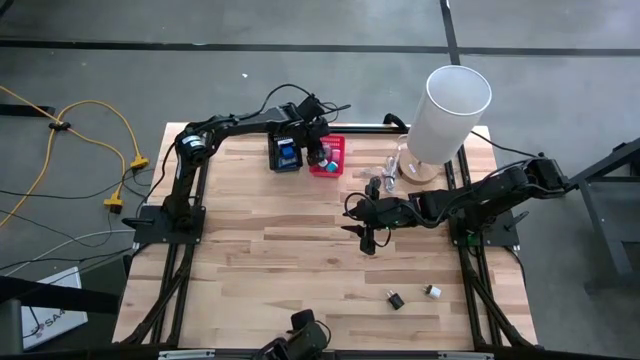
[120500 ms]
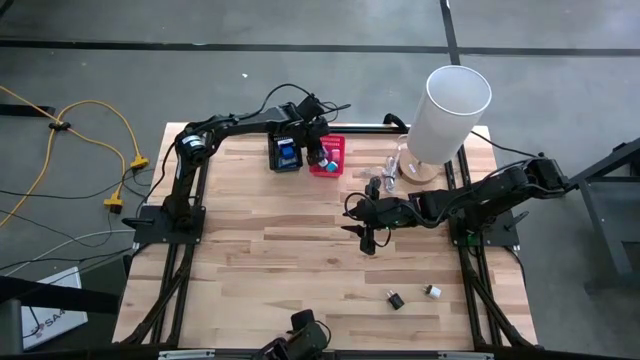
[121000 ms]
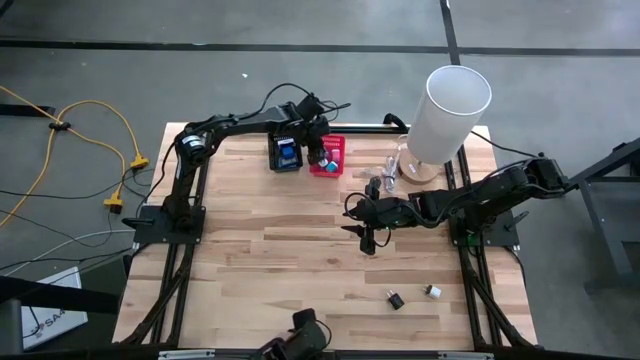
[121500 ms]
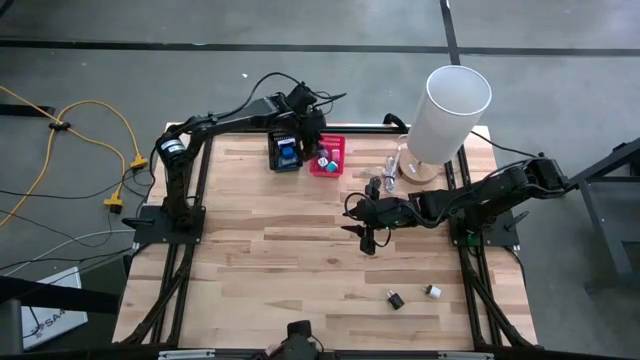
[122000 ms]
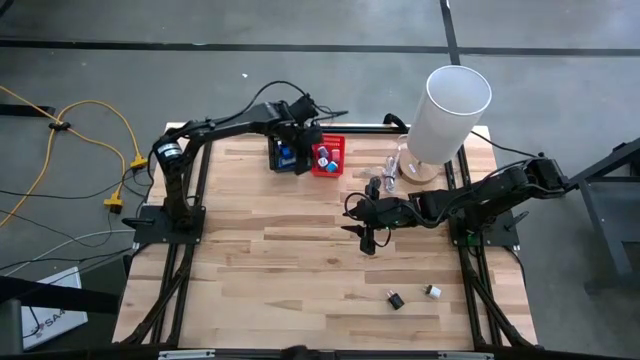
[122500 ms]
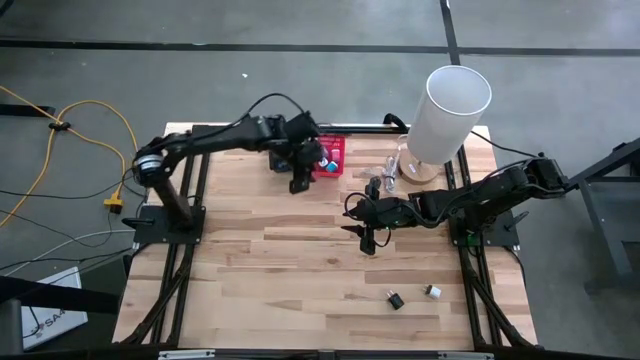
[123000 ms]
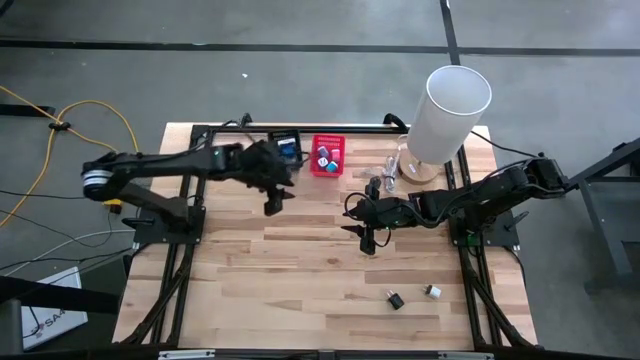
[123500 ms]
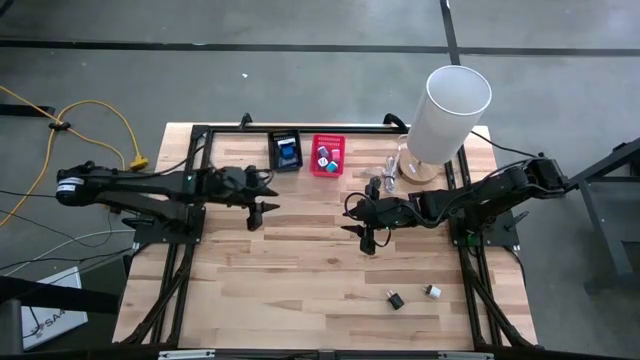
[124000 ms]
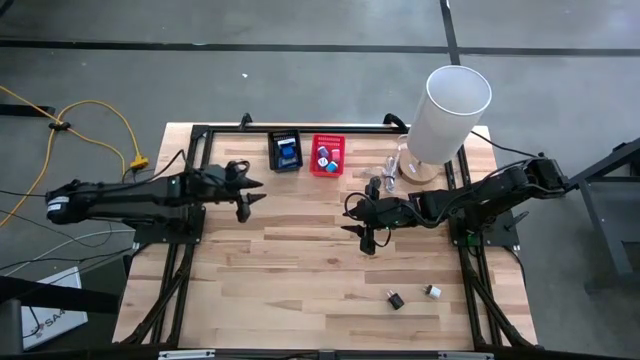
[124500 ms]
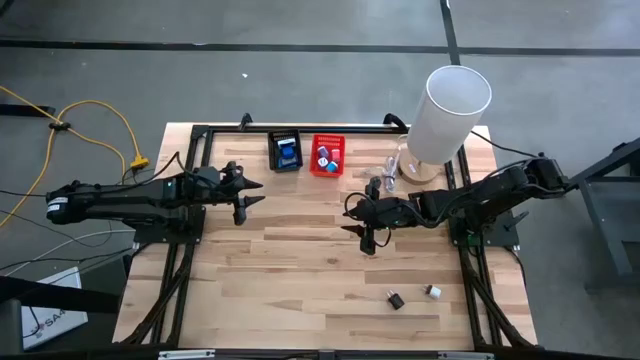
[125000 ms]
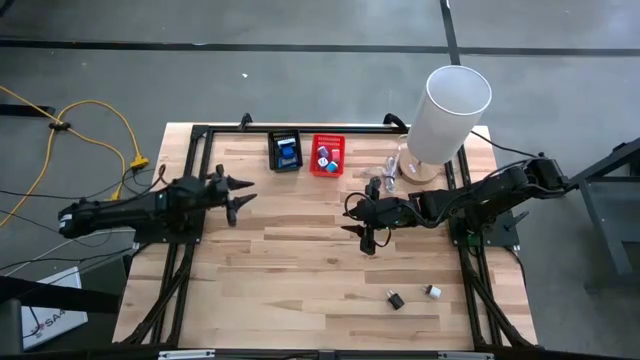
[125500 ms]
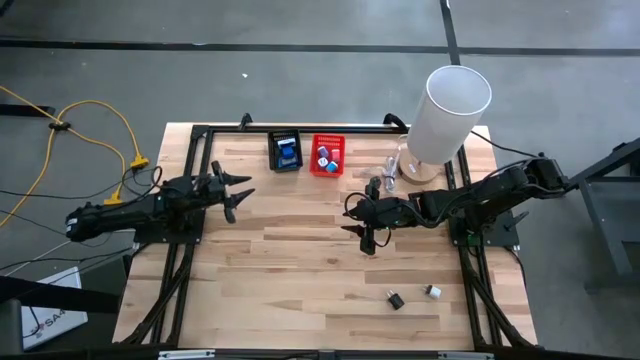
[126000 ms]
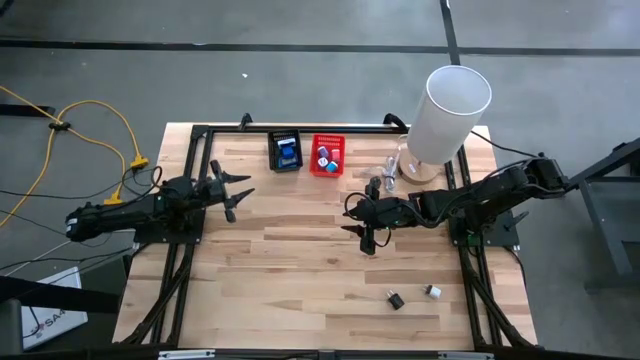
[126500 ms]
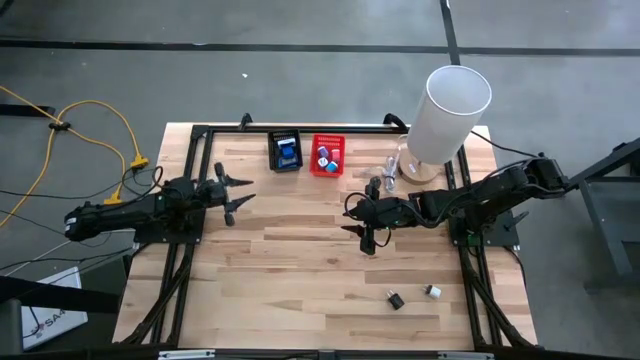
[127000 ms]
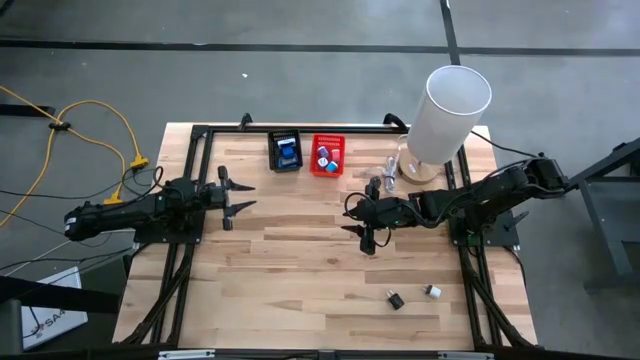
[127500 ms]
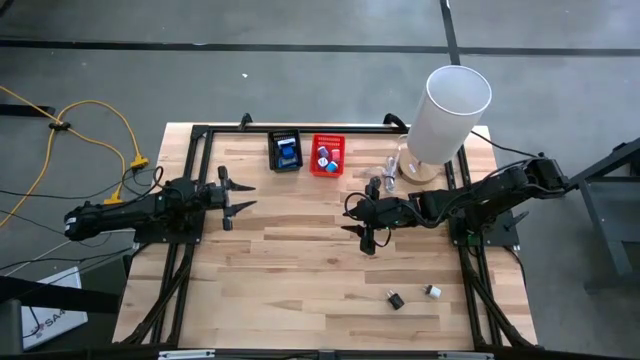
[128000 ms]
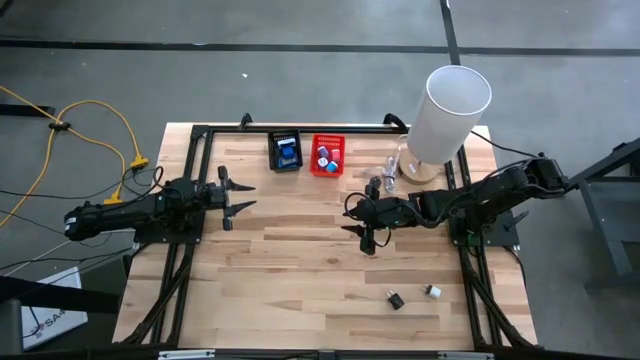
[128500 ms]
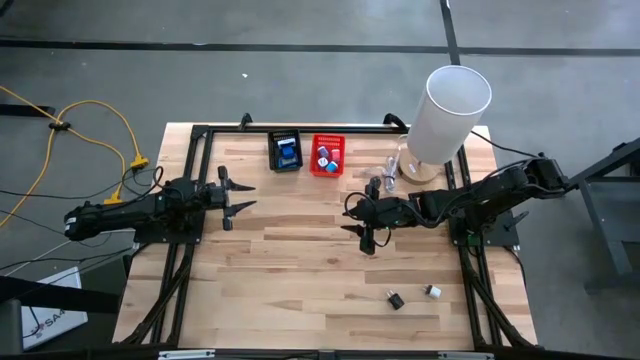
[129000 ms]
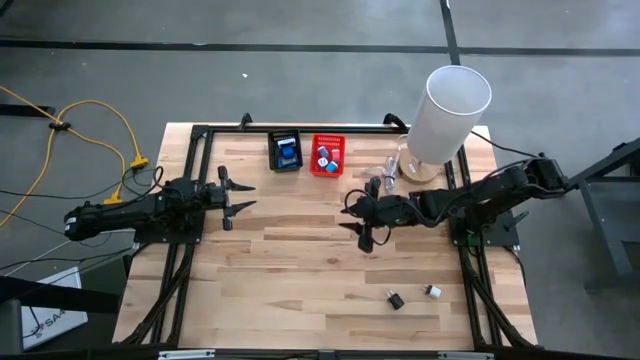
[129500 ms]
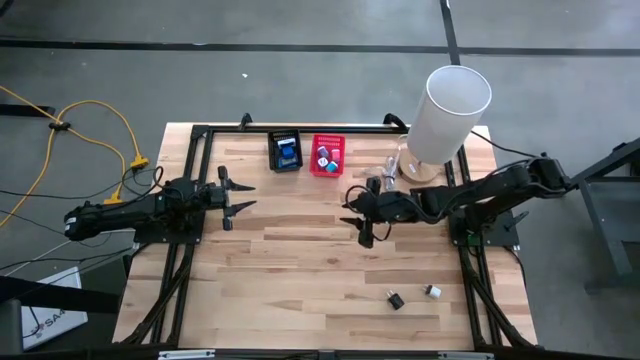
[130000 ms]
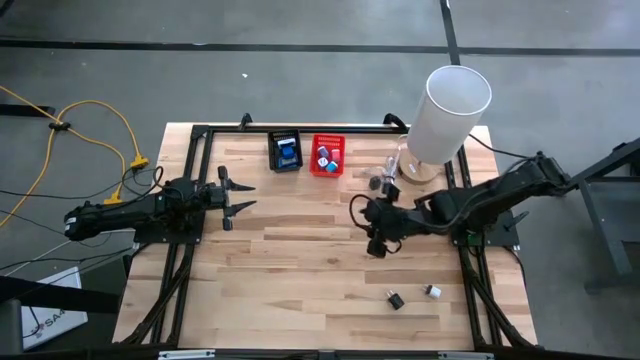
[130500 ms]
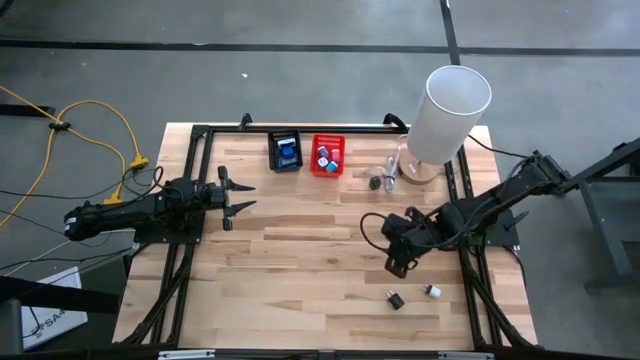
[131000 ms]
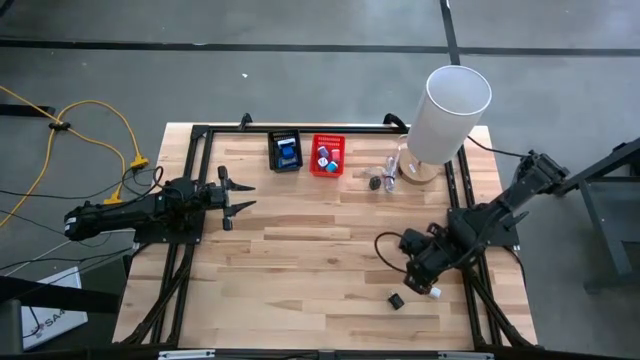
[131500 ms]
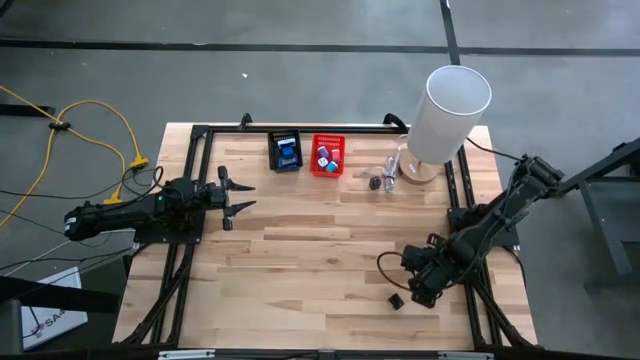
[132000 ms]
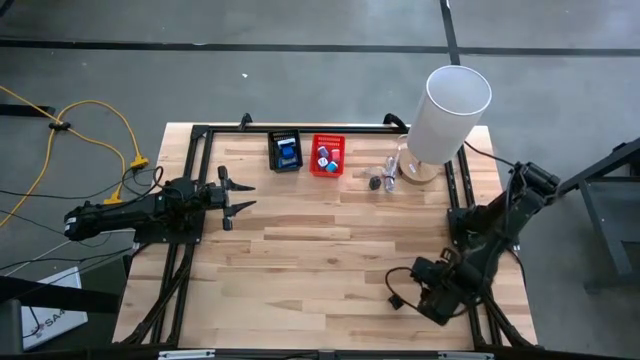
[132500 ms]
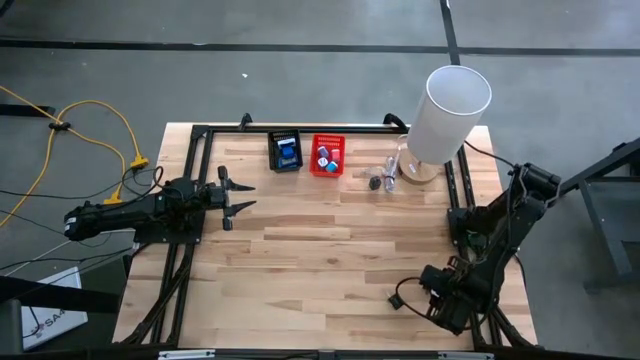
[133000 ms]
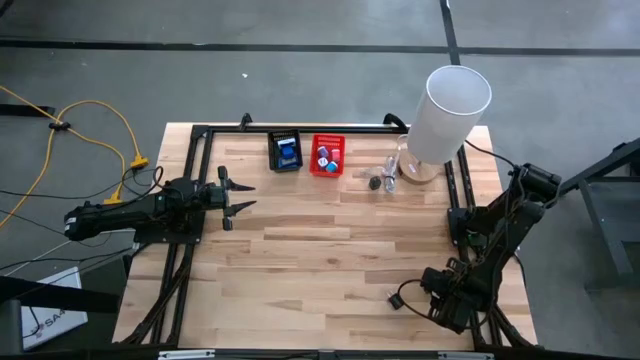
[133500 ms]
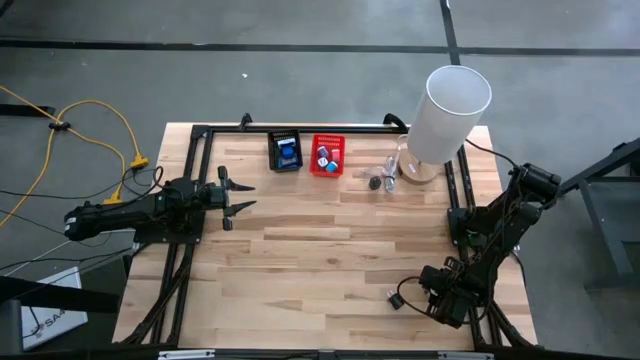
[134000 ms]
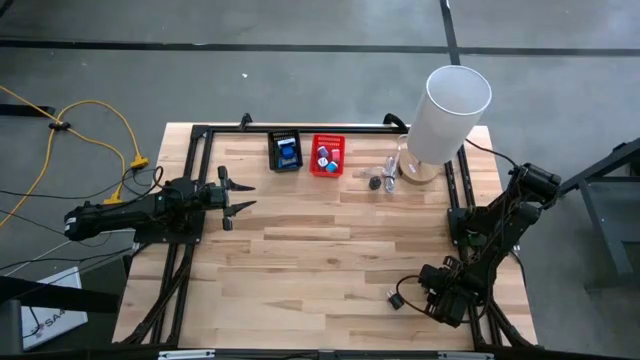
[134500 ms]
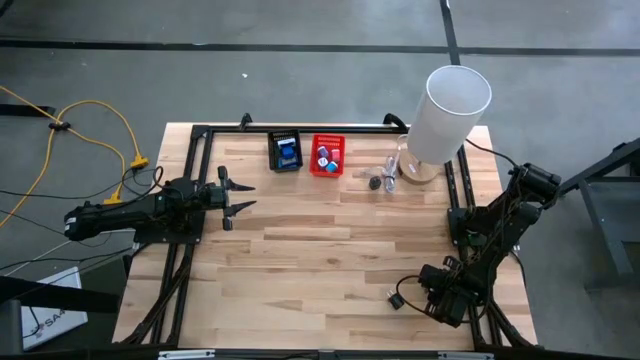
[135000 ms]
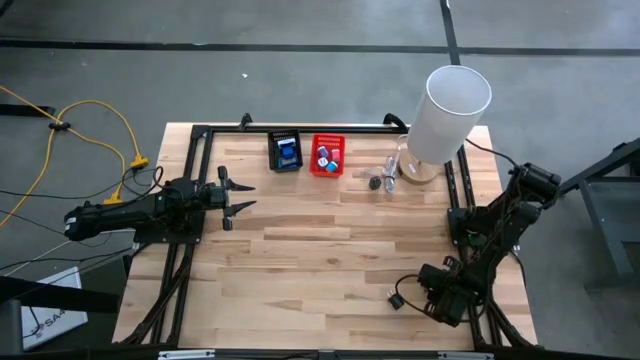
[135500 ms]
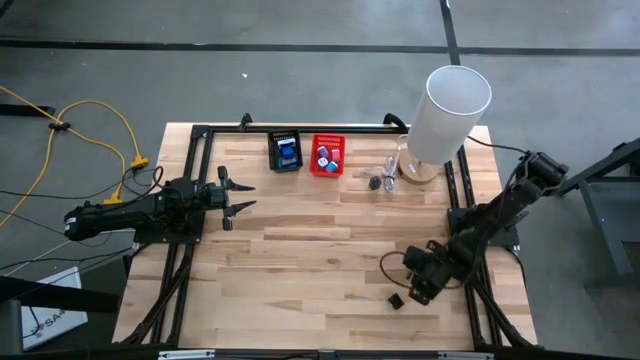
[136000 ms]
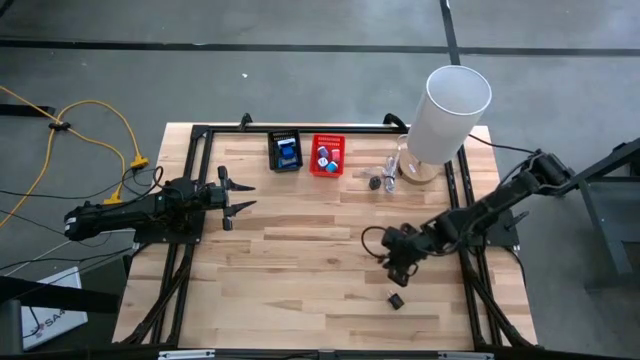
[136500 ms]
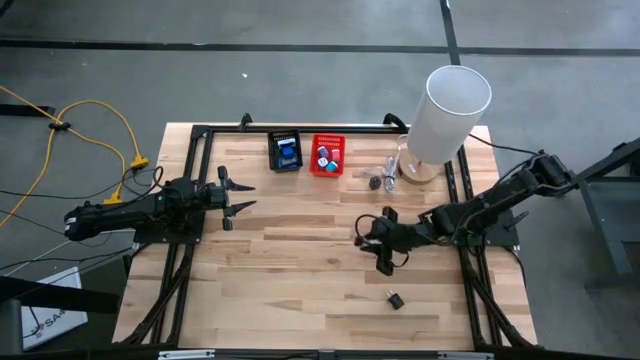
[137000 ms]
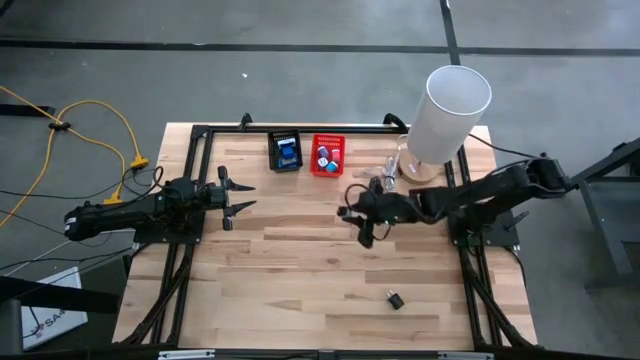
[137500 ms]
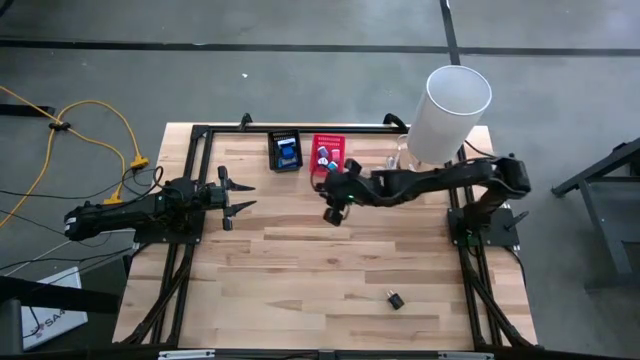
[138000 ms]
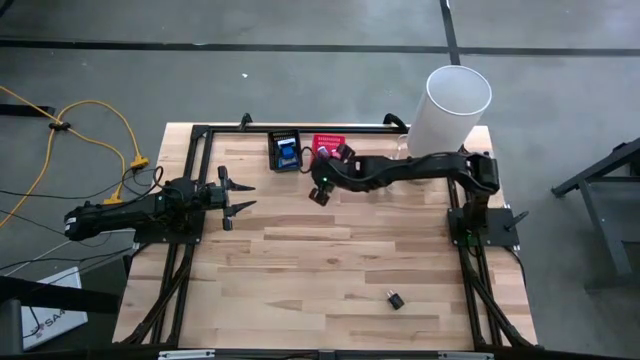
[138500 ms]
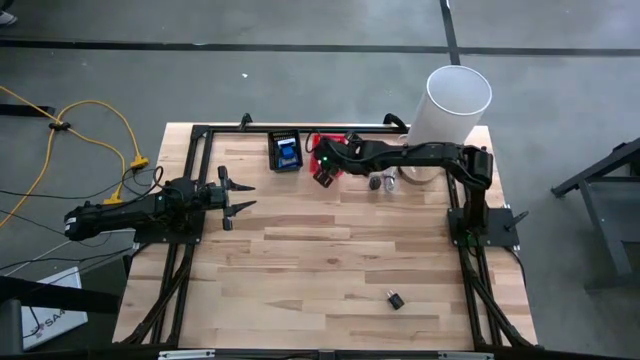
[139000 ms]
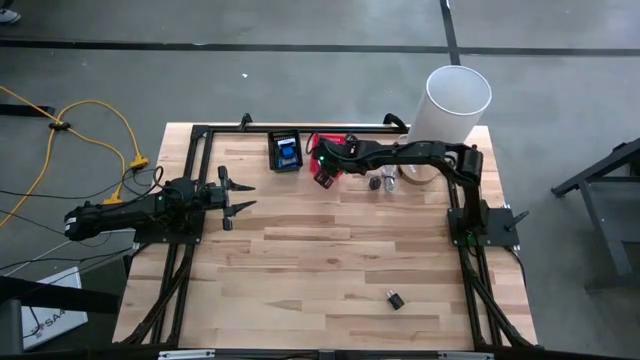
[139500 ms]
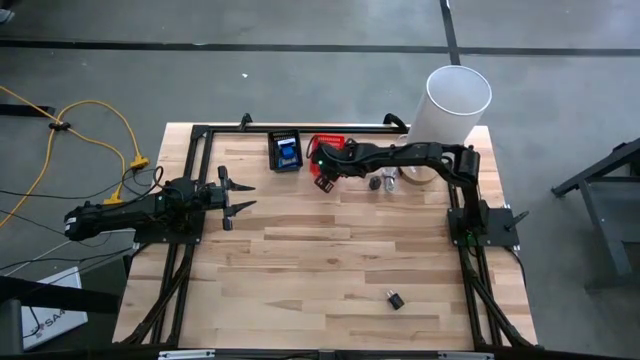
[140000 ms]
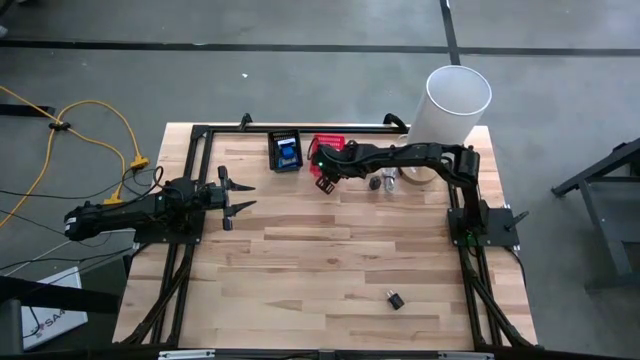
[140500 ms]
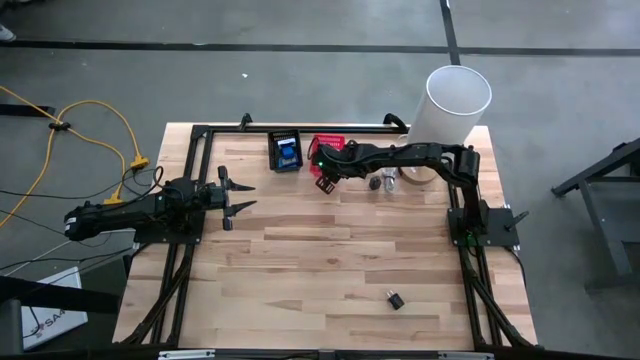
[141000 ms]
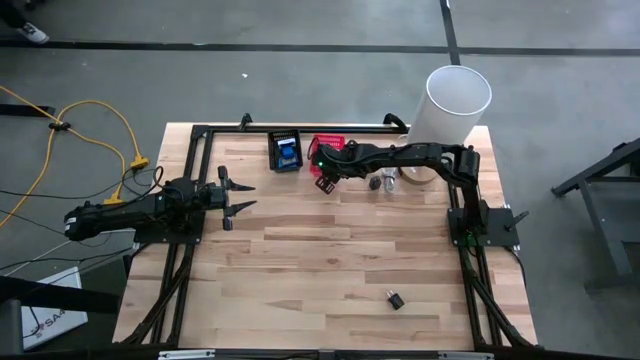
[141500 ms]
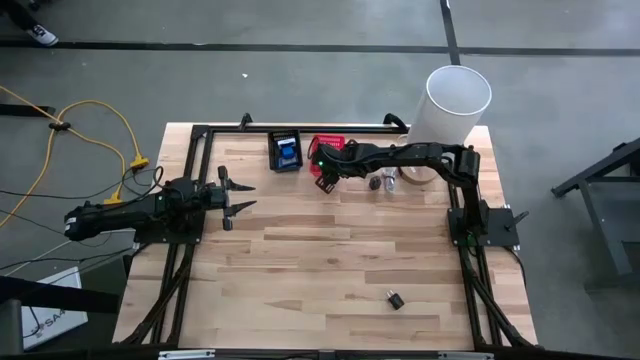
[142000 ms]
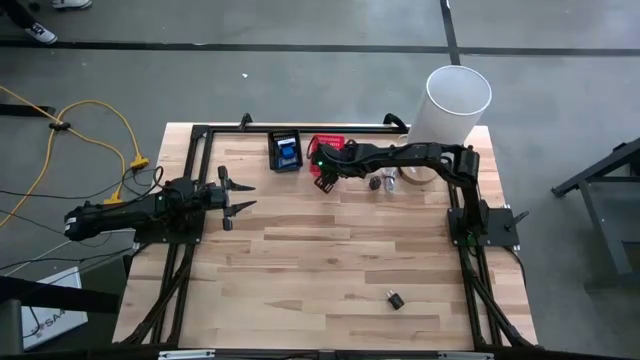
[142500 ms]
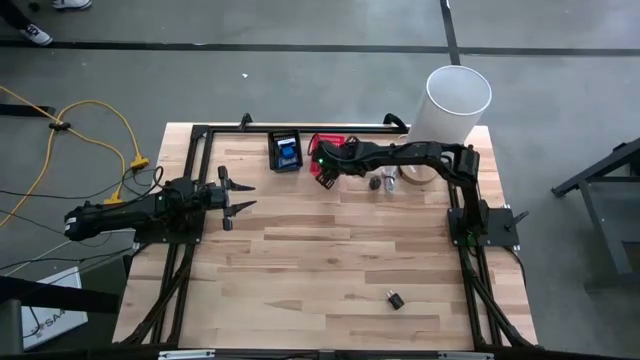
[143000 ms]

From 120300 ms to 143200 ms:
Task: Pick & Place Office items
Put the white charger adapter into the red basket
